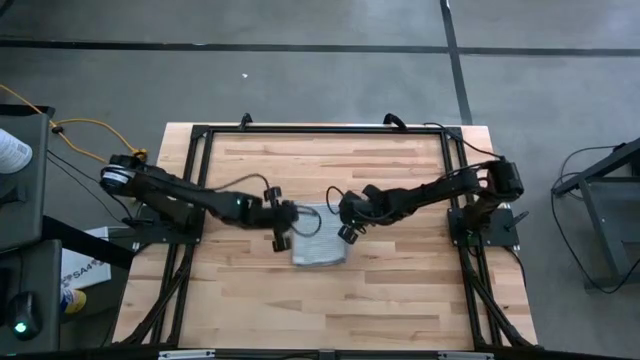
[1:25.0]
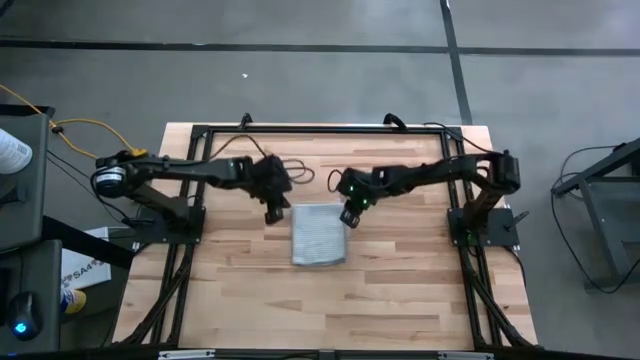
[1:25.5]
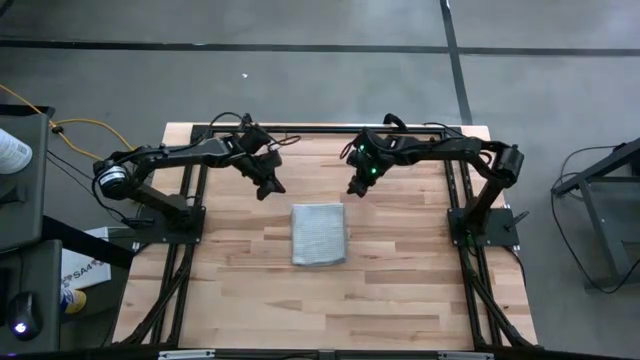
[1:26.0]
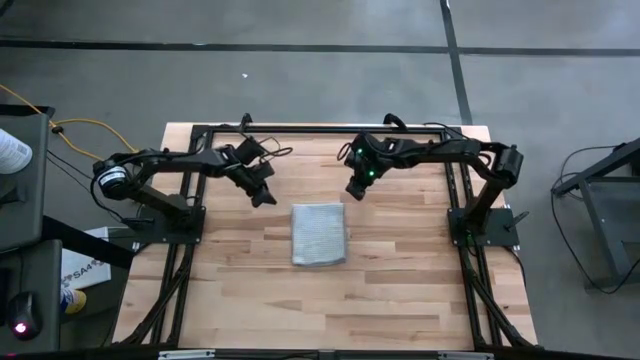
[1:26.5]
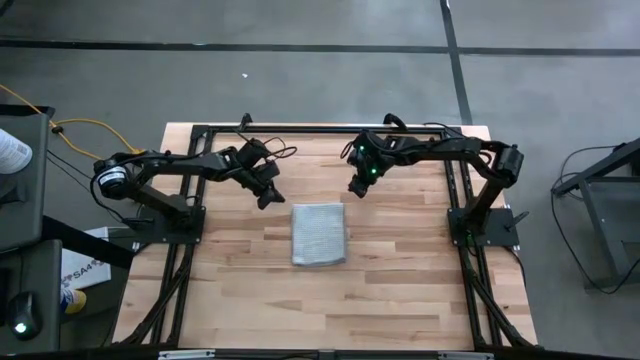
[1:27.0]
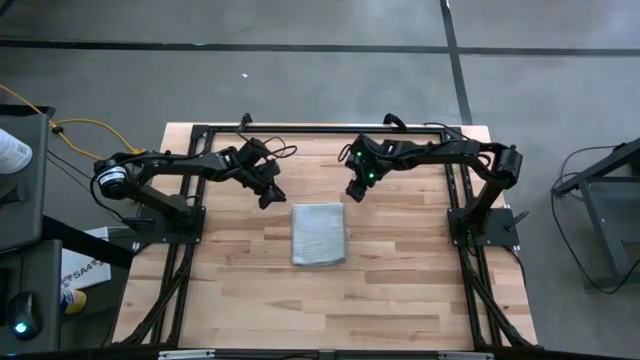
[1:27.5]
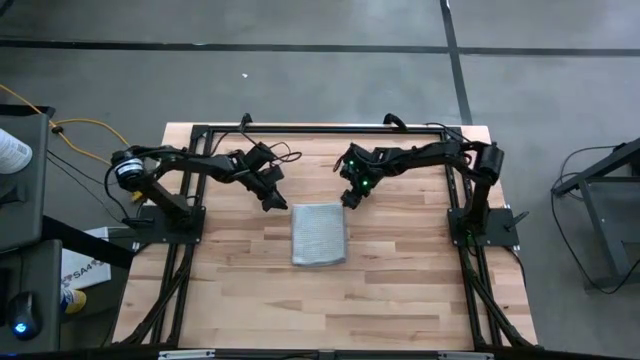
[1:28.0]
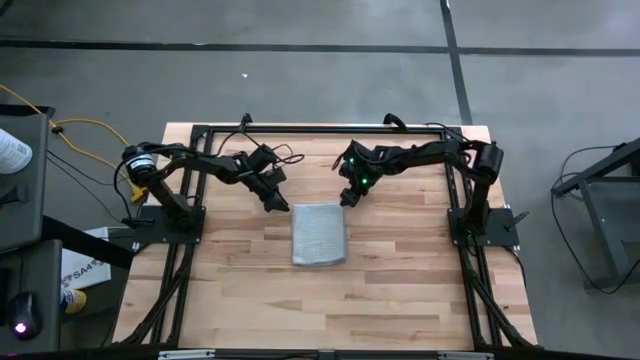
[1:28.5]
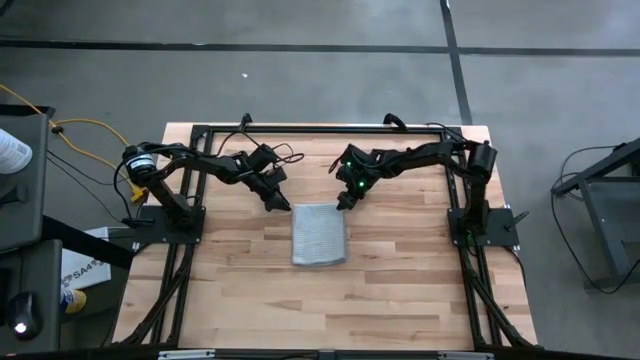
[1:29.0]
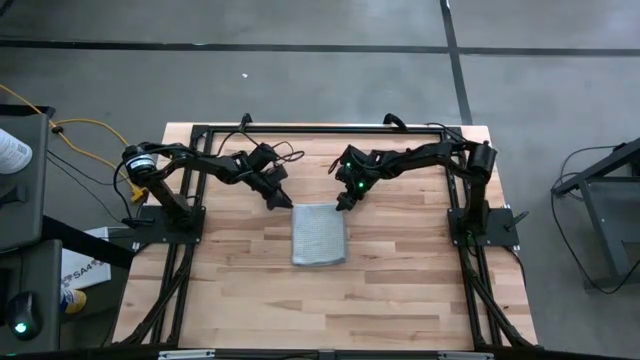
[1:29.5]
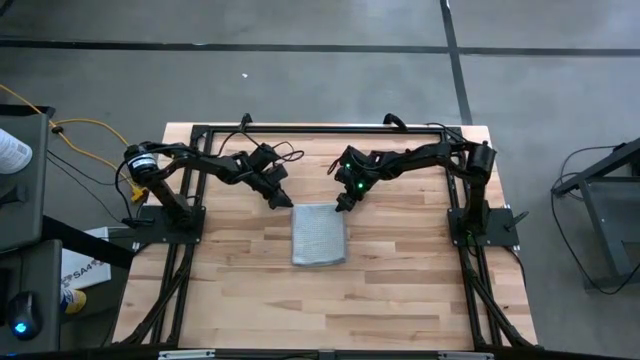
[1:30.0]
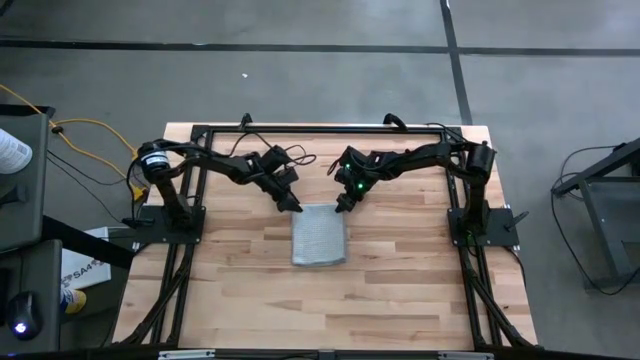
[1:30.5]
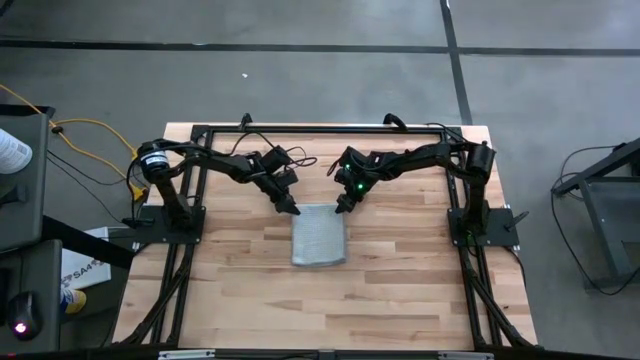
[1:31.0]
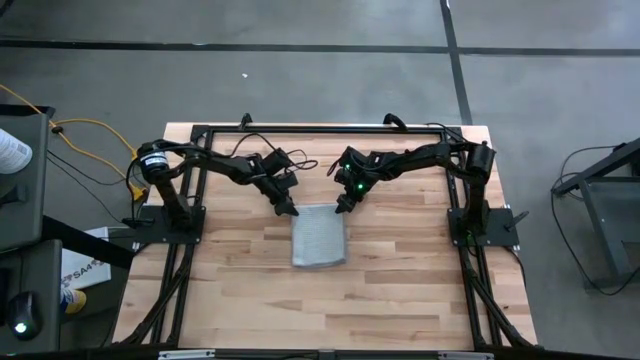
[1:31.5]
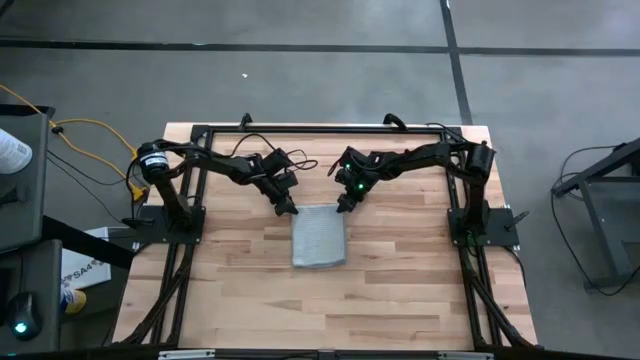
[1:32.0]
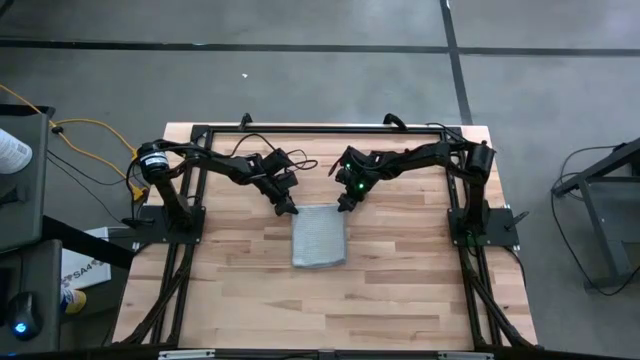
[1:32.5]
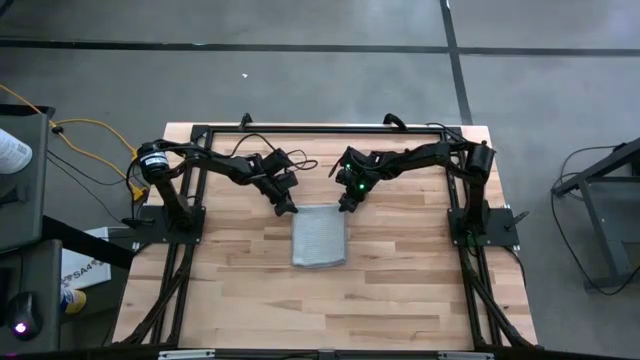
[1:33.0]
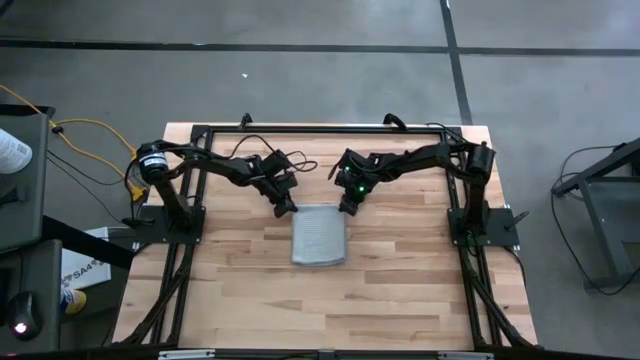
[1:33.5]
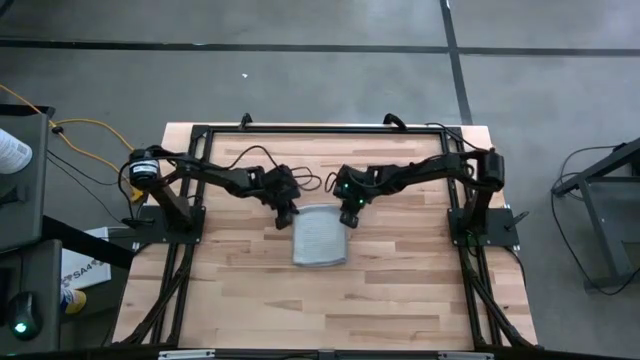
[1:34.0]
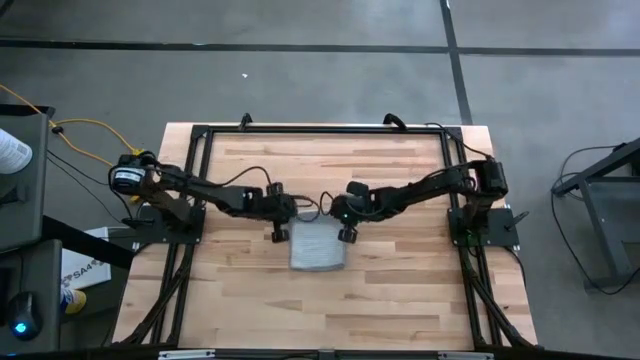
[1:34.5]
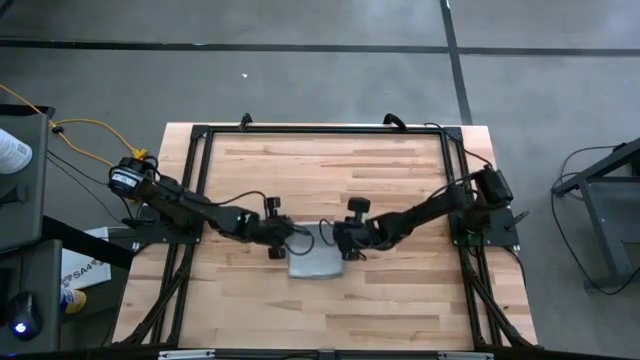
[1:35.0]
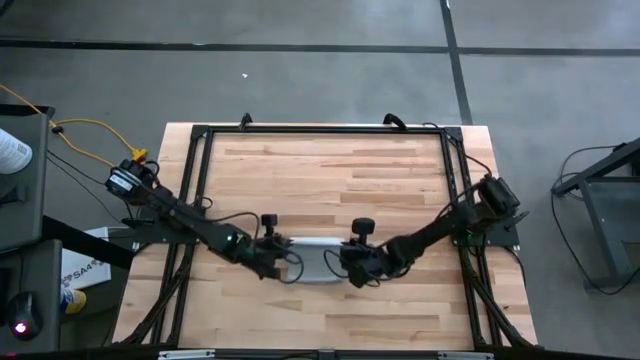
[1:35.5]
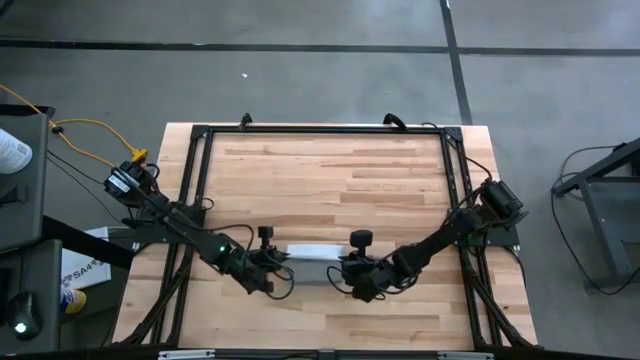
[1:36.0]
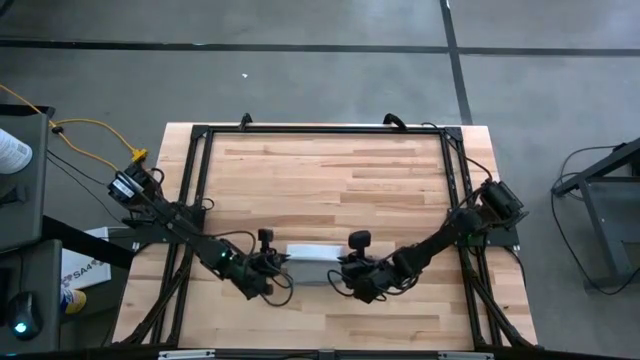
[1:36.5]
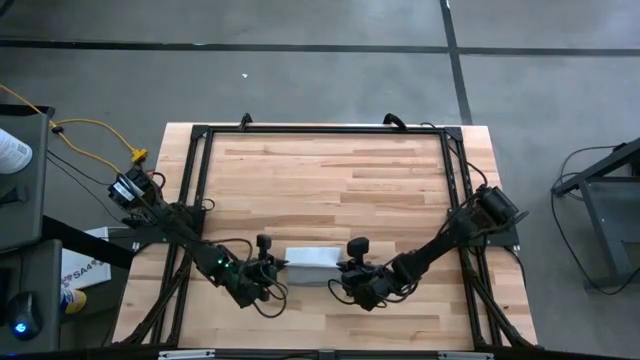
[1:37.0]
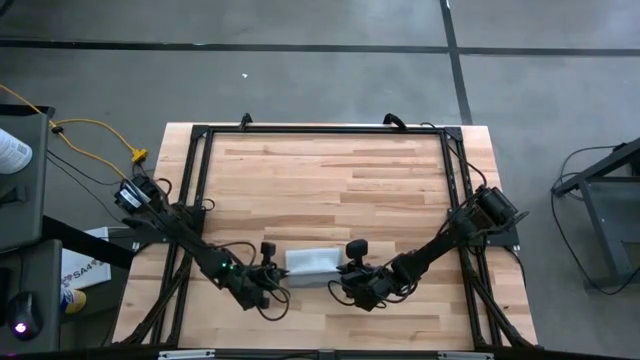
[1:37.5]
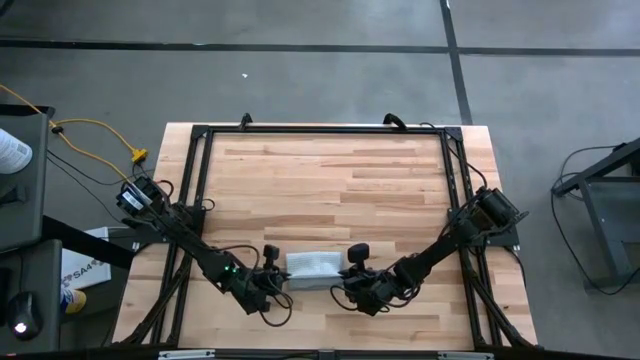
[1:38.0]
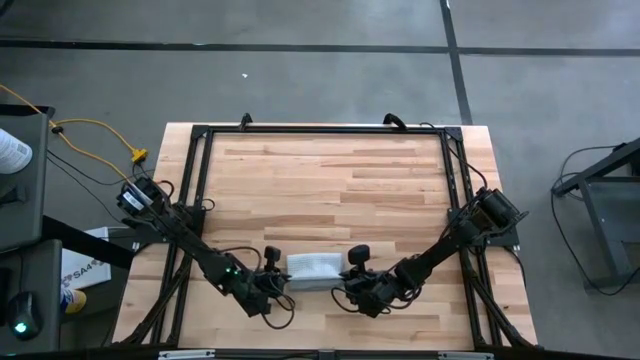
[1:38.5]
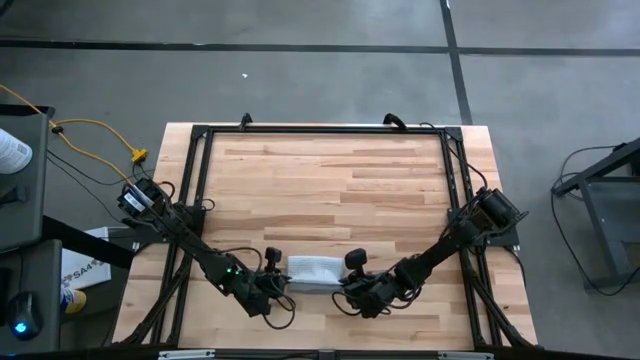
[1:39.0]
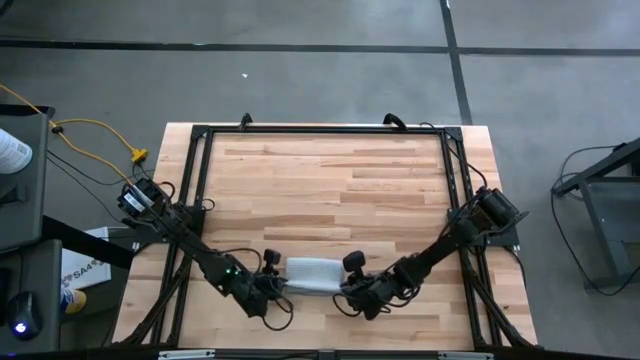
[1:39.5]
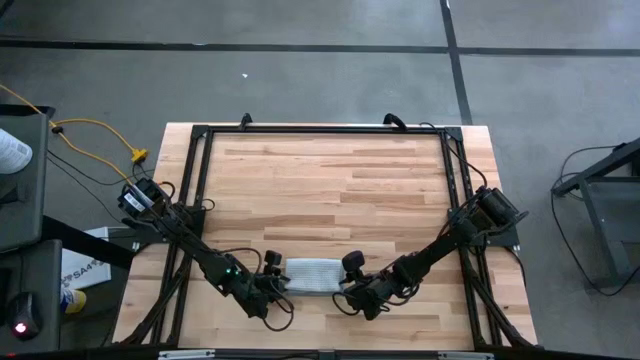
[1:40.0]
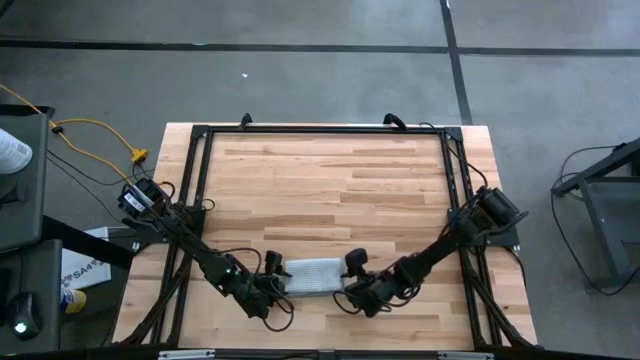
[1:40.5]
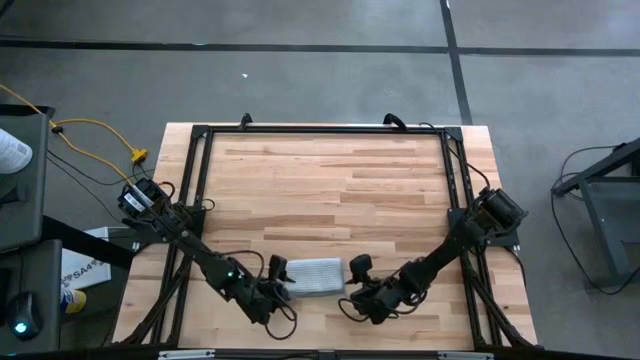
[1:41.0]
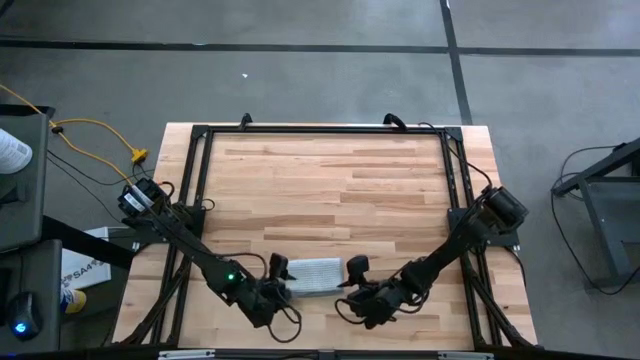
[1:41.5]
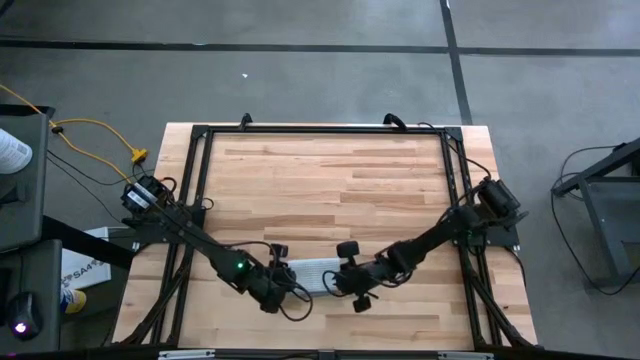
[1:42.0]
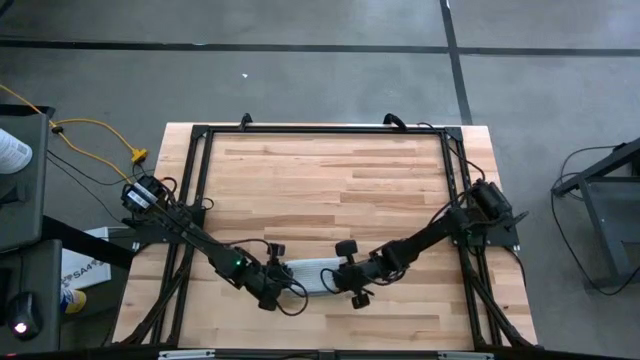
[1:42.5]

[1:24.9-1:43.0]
Task: Fold microfiber towels
Fold the gray microfiber cloth

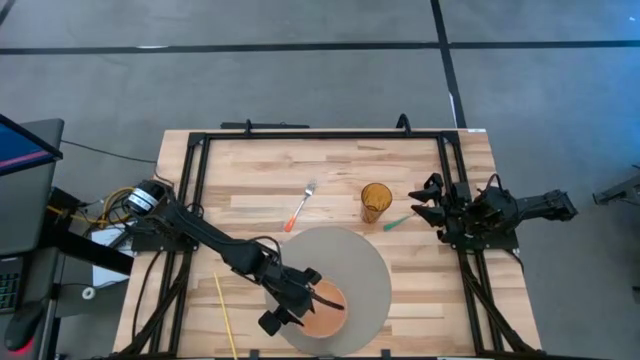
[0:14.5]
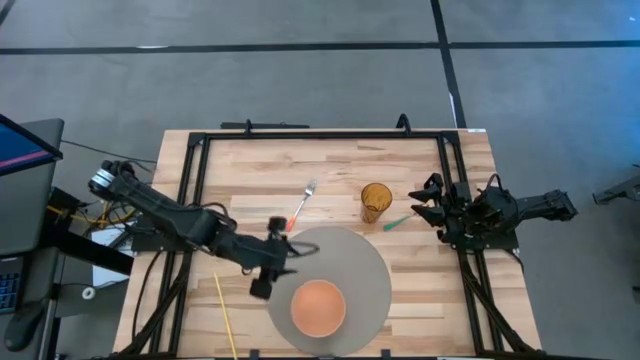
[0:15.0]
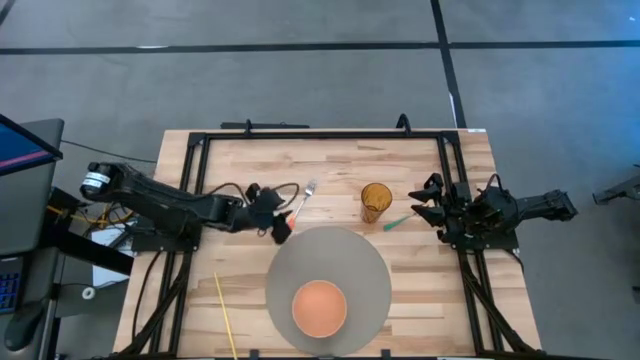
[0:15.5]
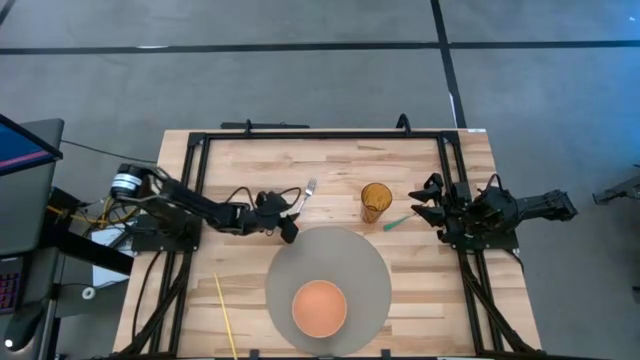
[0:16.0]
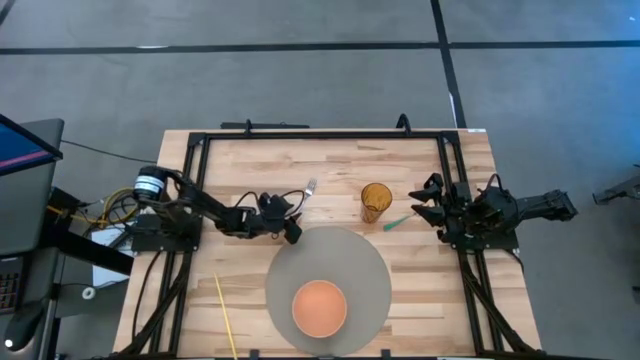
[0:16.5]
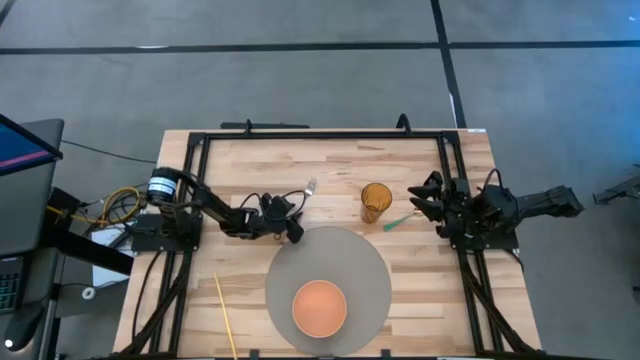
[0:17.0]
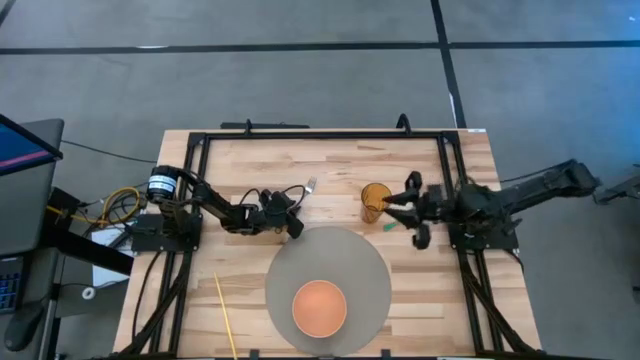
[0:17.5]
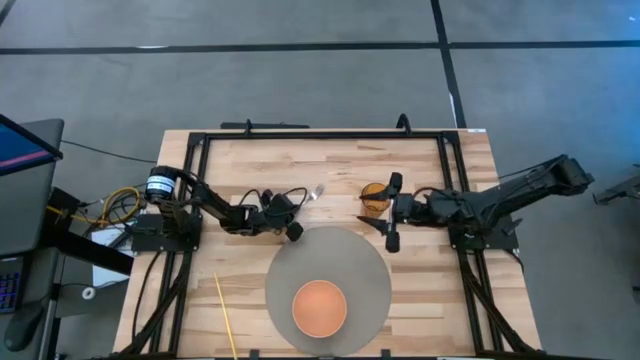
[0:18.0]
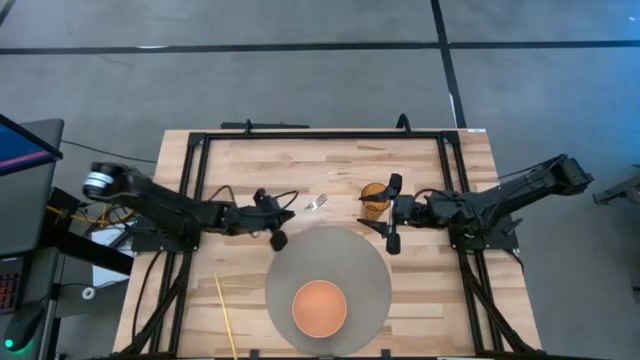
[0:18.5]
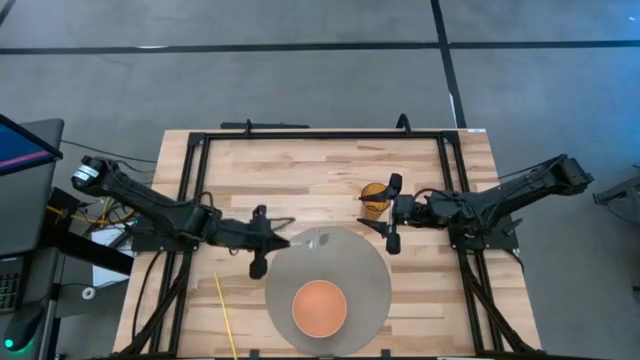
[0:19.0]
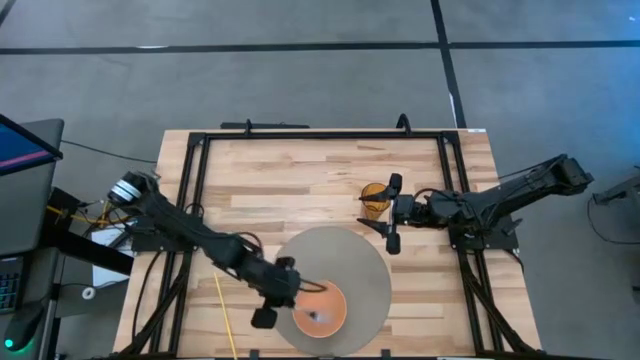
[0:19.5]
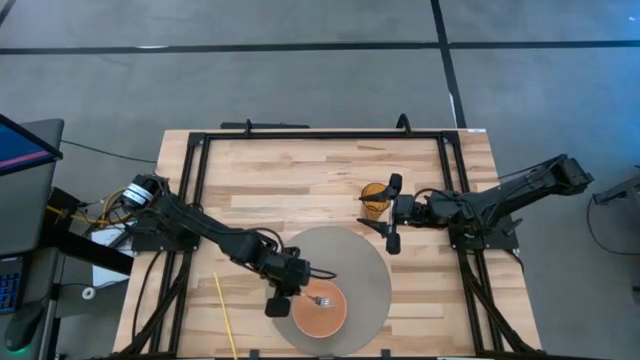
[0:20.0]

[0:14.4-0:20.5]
Task: Pick & Place Utensil
Put the orange fork into the orange bowl
